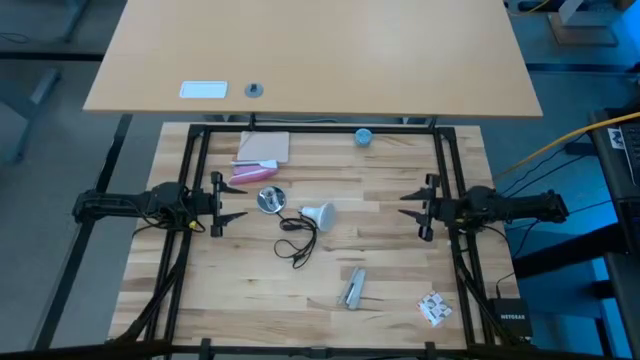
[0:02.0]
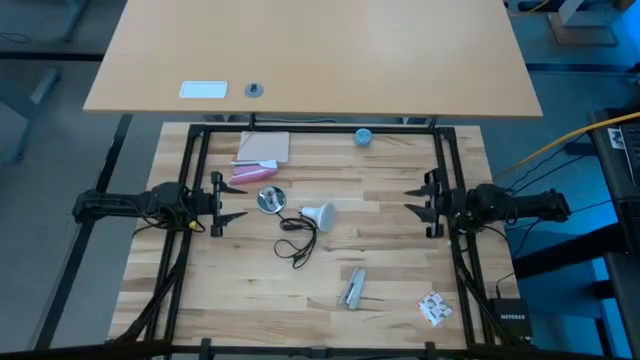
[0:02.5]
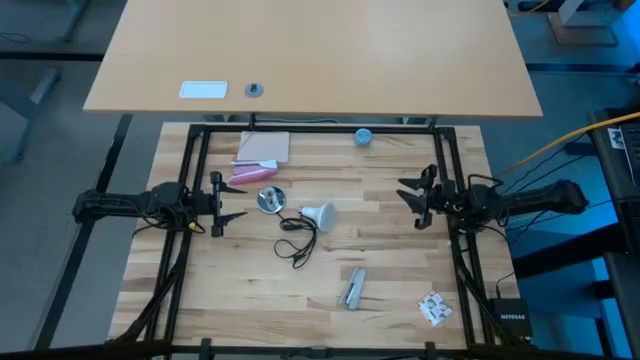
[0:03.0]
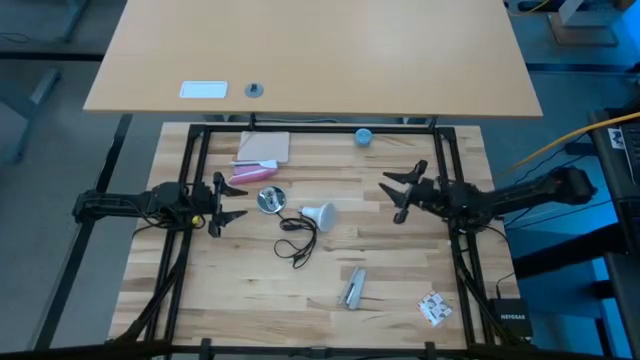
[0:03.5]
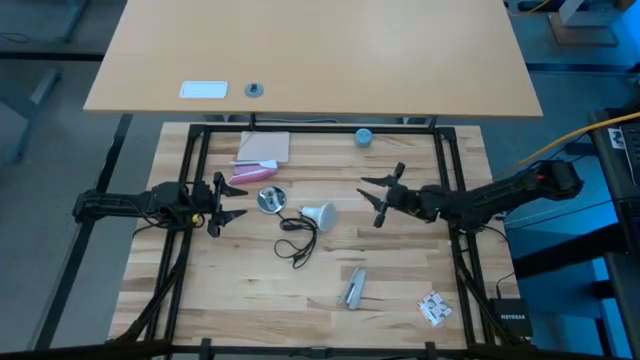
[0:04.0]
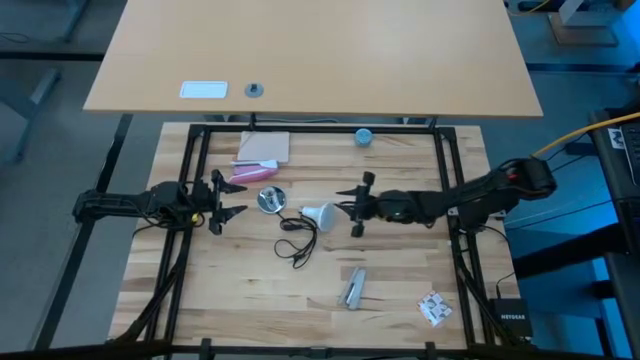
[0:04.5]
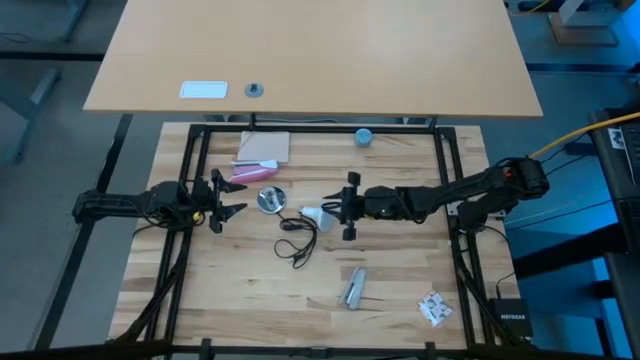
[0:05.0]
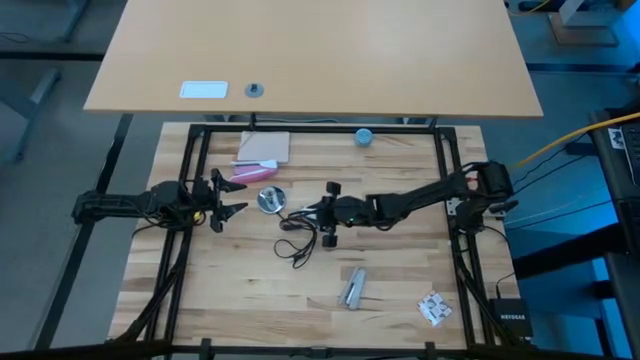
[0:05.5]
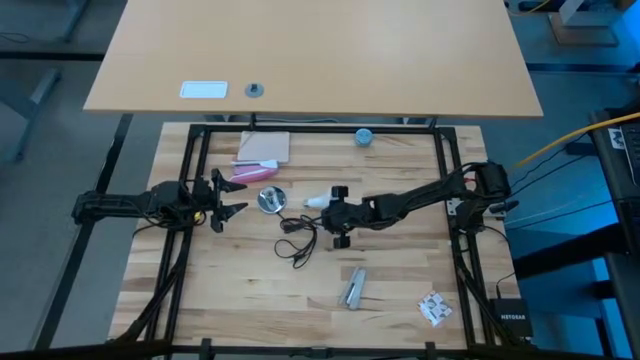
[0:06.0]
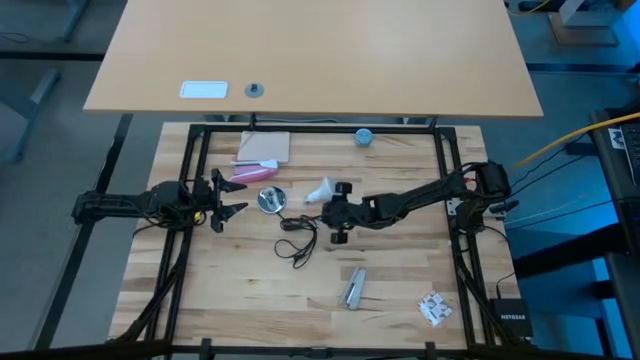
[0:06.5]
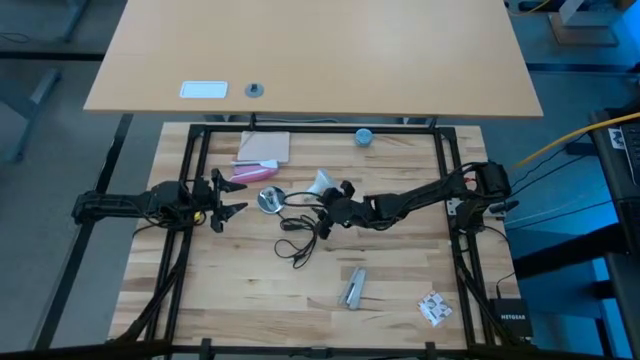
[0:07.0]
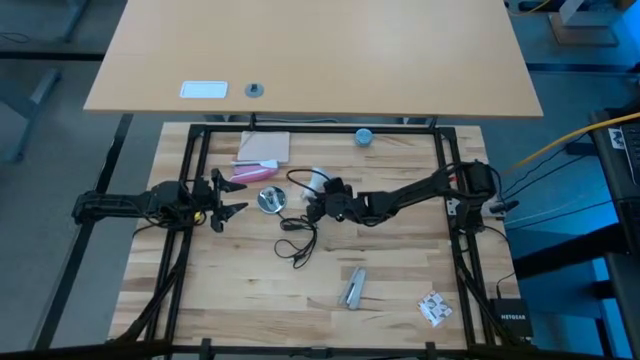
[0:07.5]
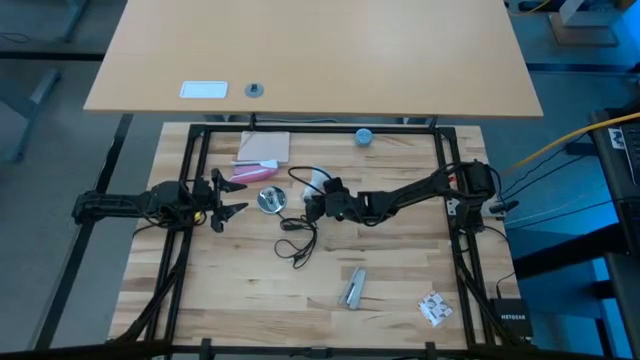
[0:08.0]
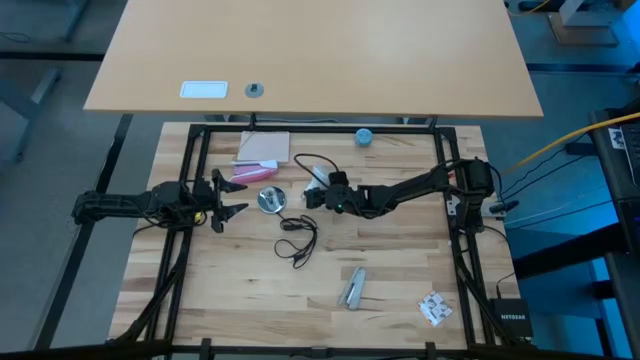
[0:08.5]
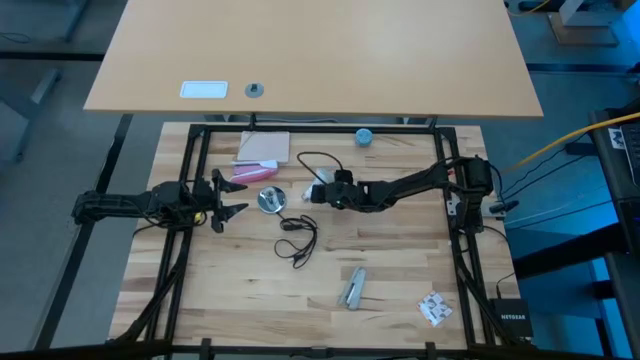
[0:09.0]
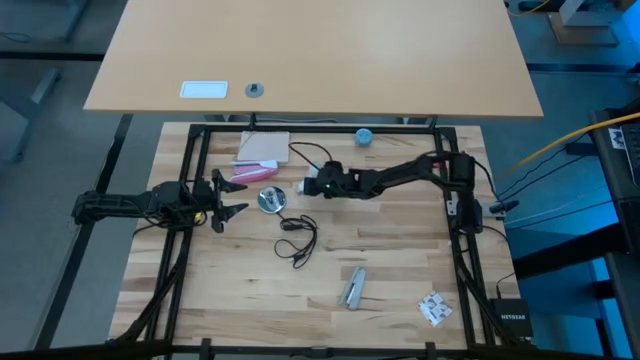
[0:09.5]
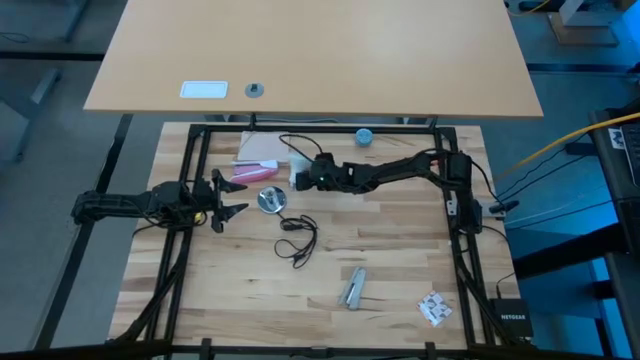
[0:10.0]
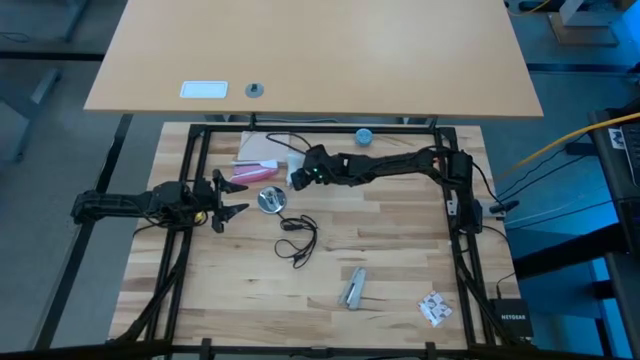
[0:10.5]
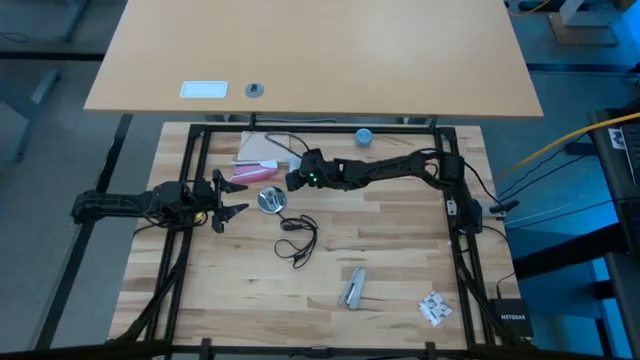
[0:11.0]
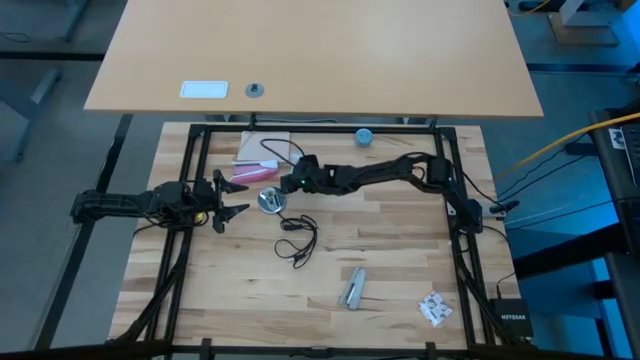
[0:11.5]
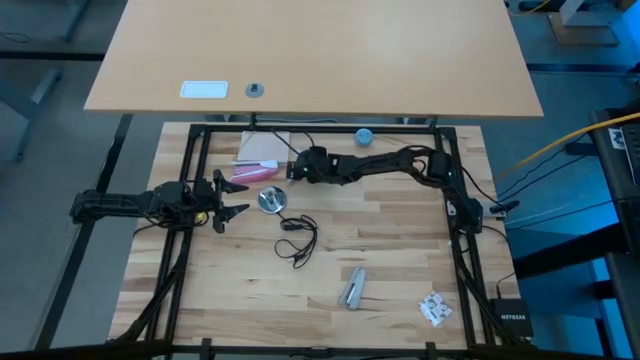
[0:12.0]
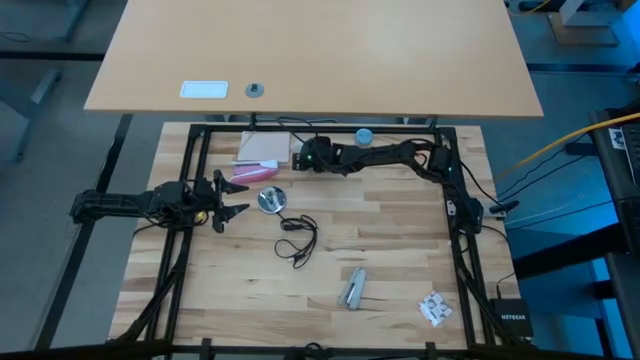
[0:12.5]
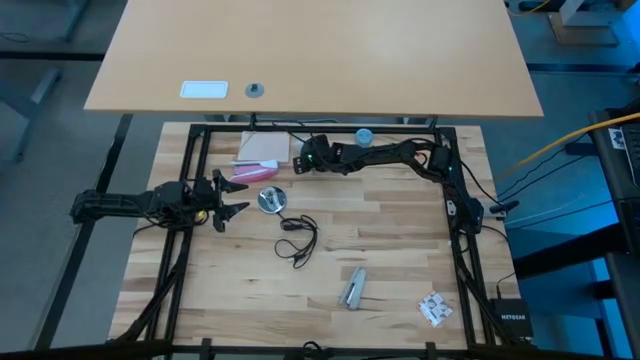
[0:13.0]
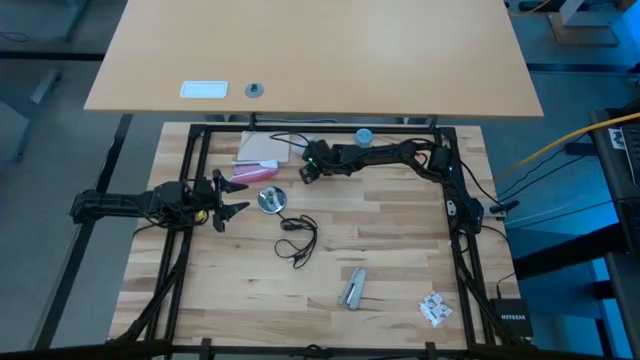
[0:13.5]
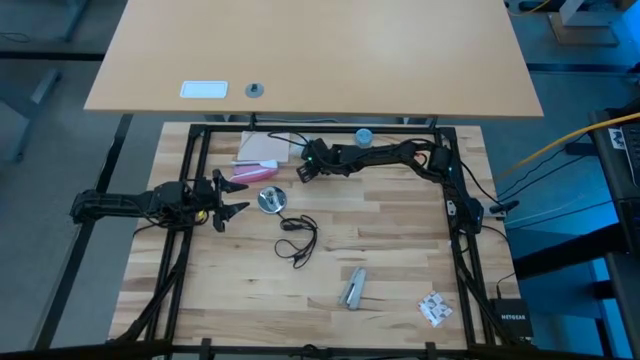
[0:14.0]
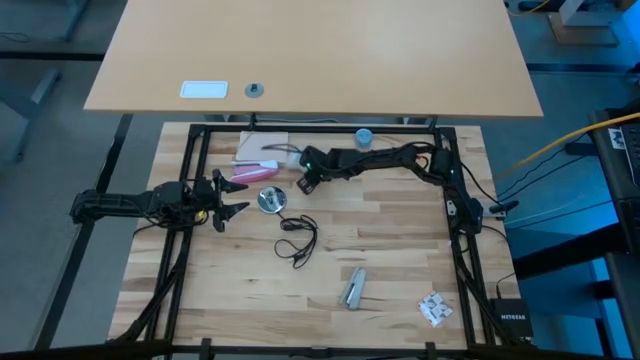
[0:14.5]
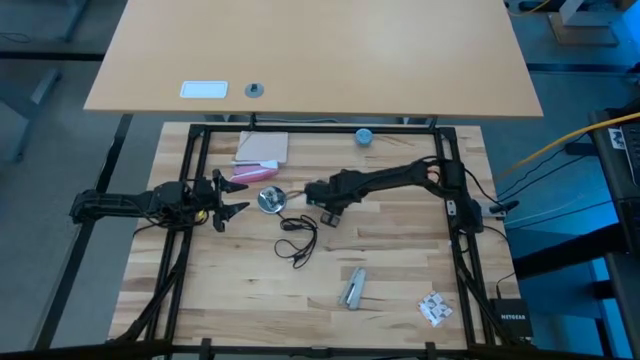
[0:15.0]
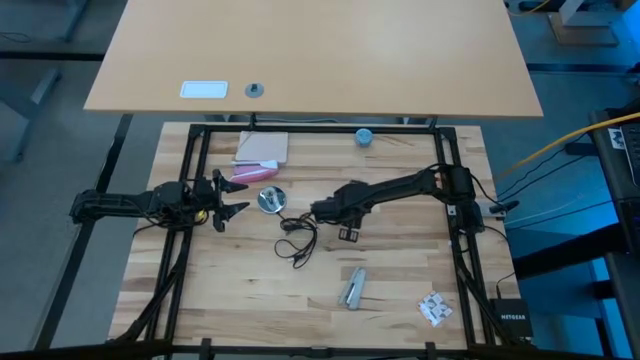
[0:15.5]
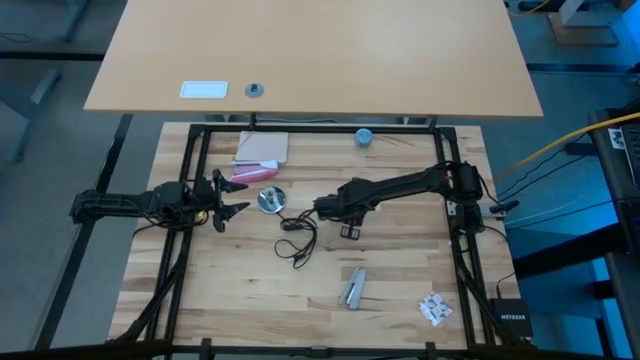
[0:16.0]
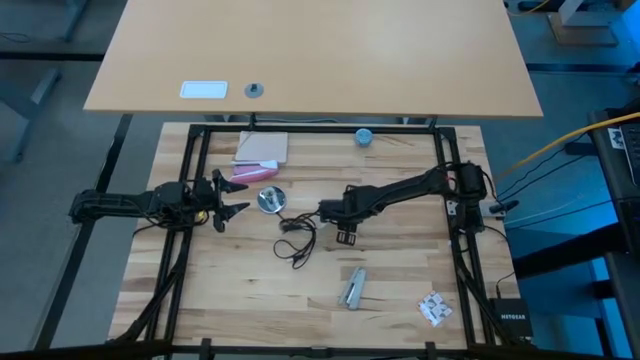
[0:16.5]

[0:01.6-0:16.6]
Task: Screw lightbulb
Insert the lightbulb into the lamp

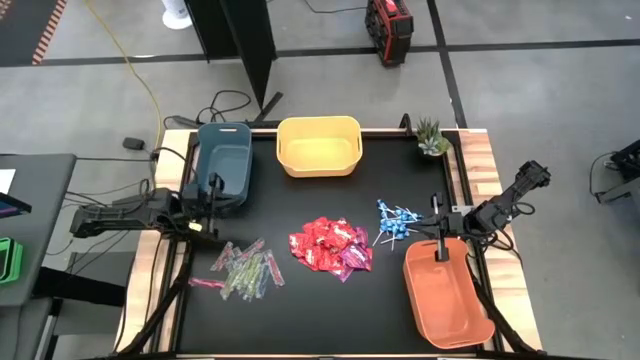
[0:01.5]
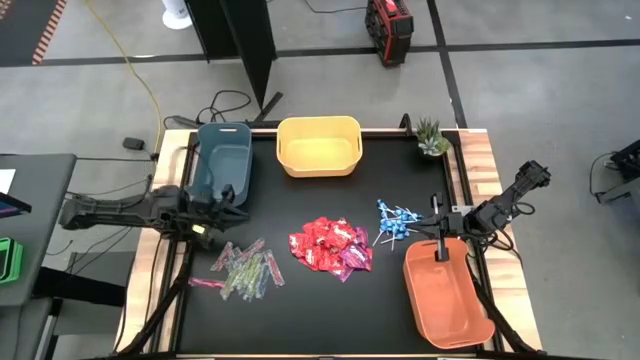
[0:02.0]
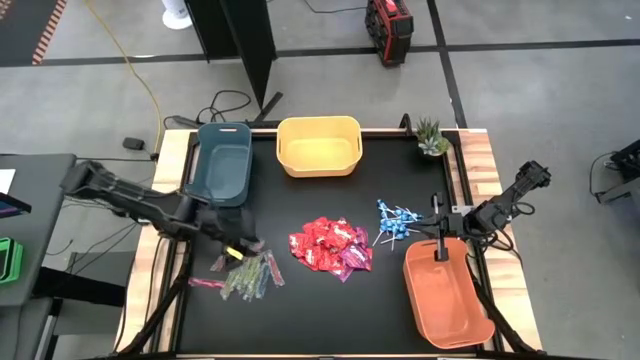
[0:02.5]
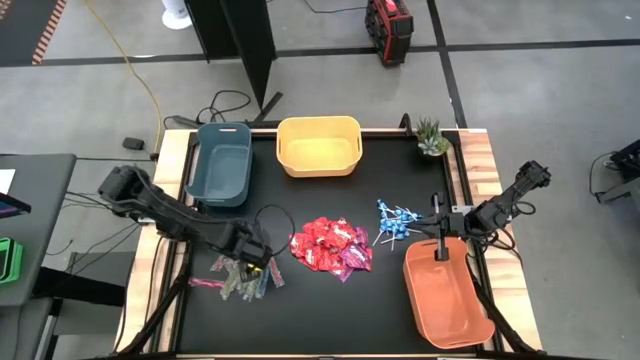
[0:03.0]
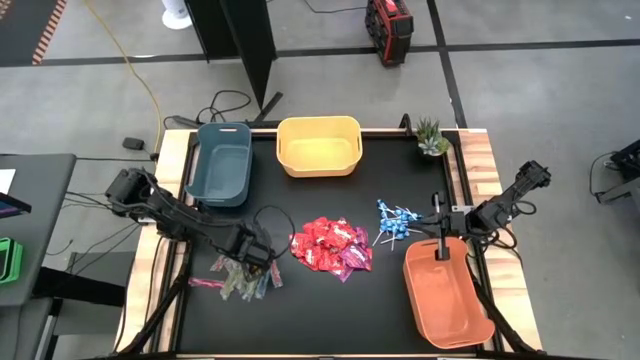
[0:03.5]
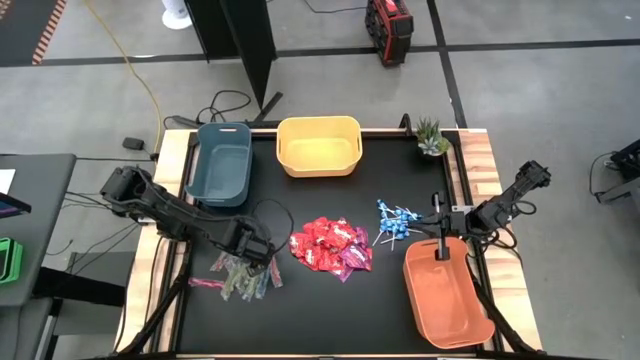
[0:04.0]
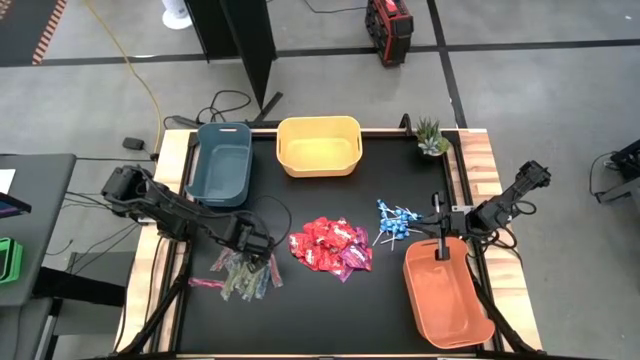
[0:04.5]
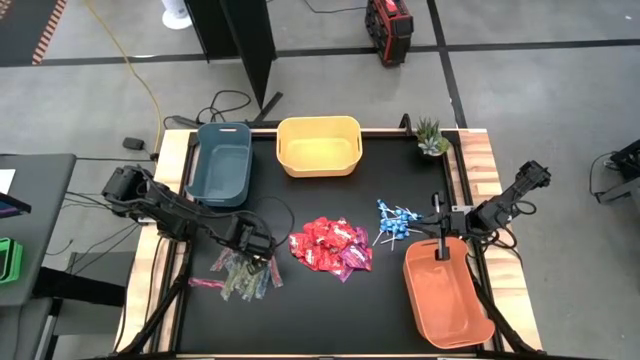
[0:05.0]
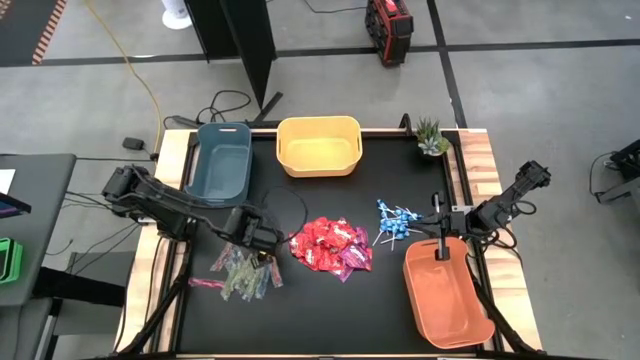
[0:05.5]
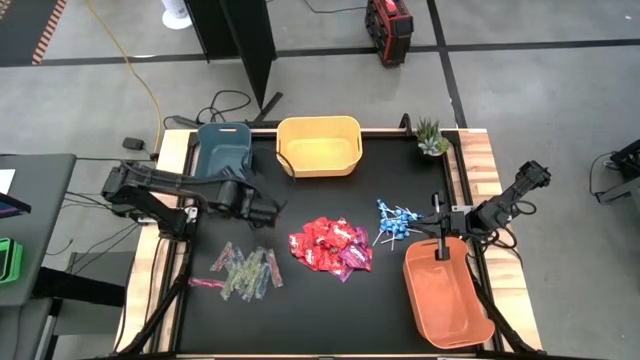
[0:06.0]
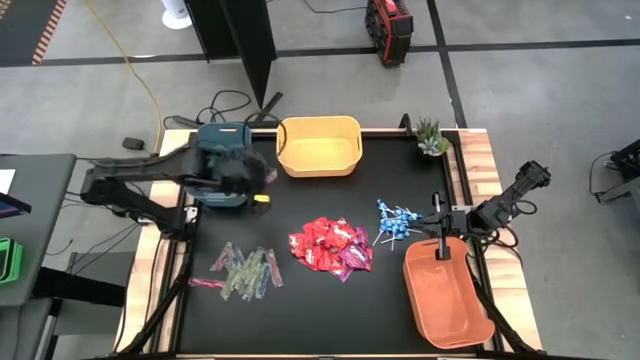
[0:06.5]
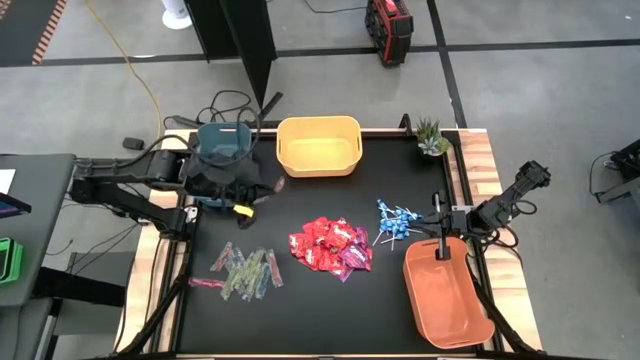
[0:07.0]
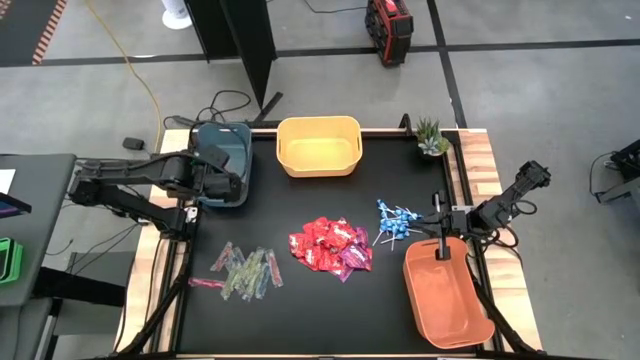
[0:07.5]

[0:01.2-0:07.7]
Task: Sort candy
Put the red gummy into the blue bin
